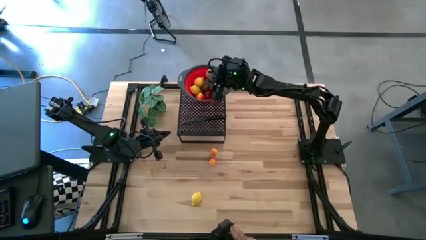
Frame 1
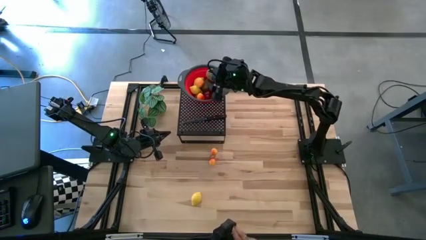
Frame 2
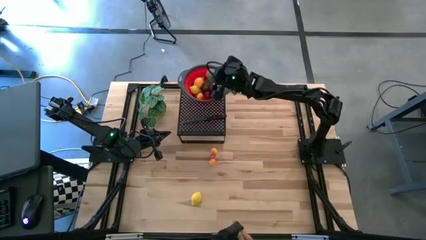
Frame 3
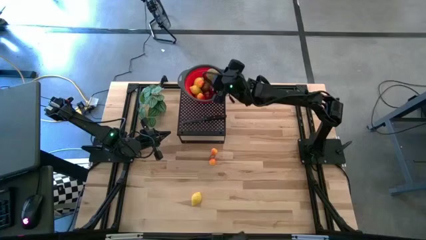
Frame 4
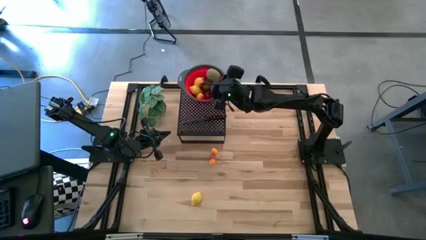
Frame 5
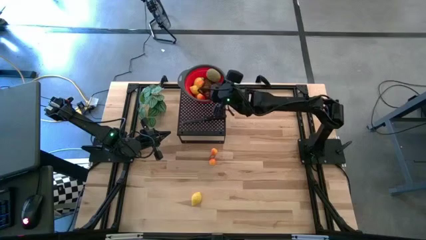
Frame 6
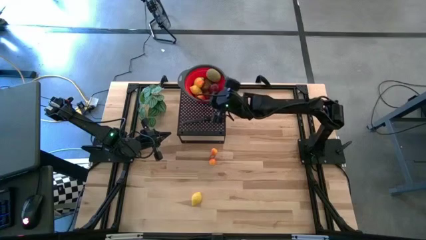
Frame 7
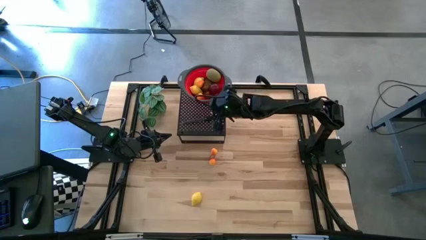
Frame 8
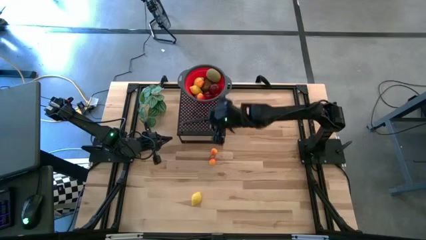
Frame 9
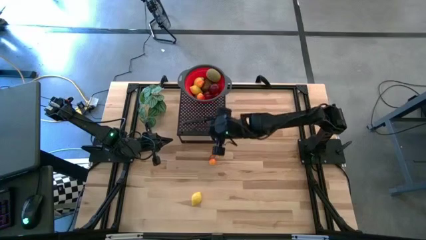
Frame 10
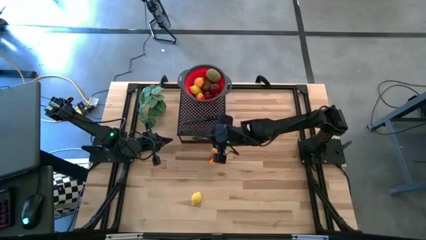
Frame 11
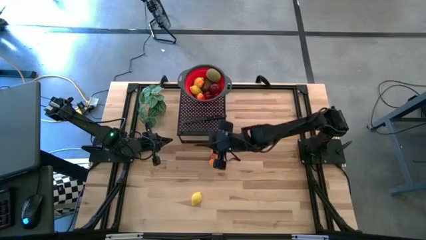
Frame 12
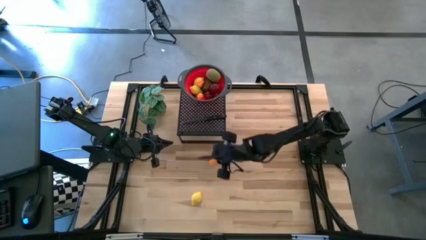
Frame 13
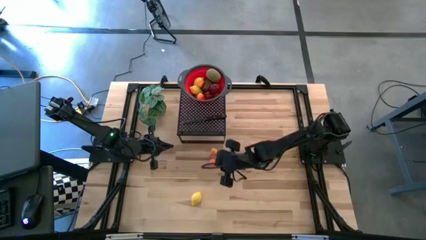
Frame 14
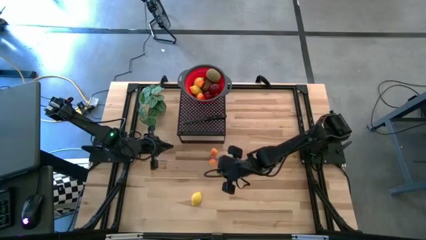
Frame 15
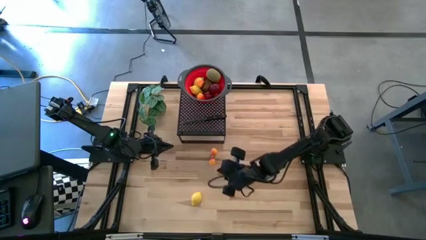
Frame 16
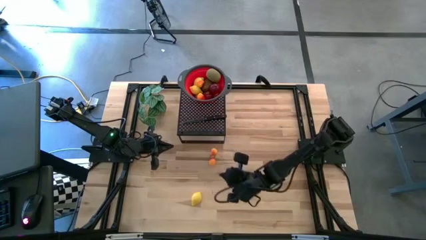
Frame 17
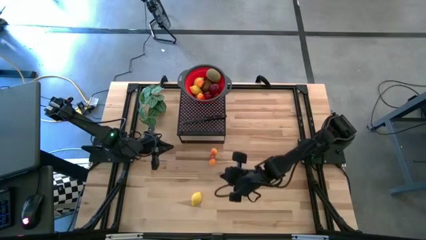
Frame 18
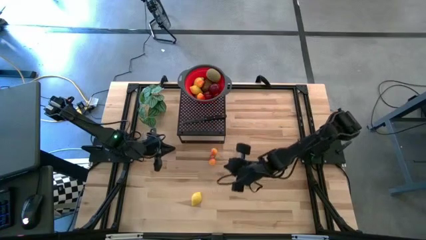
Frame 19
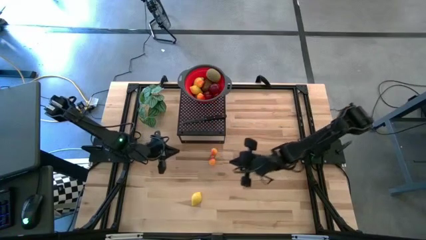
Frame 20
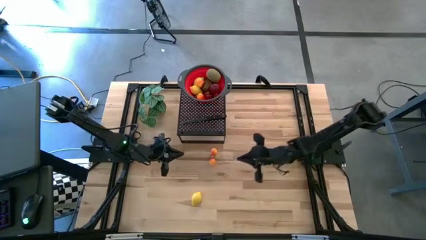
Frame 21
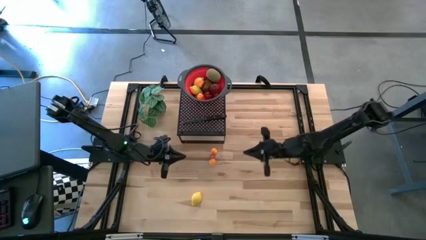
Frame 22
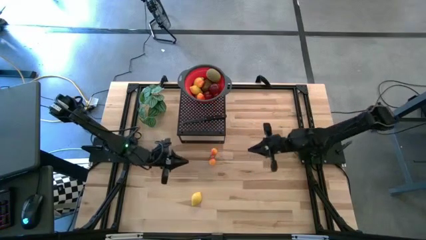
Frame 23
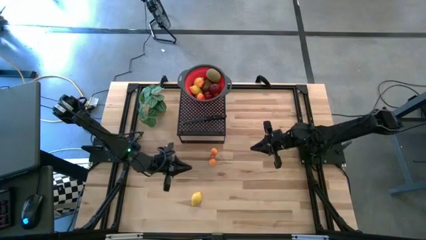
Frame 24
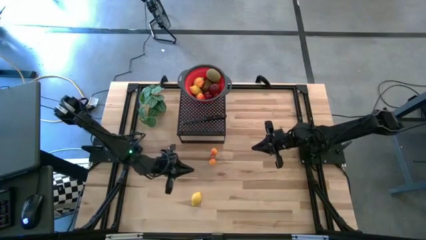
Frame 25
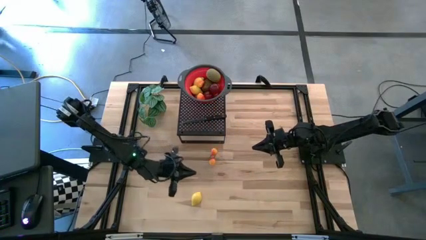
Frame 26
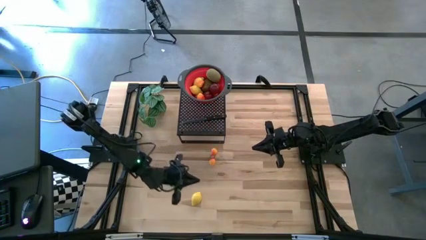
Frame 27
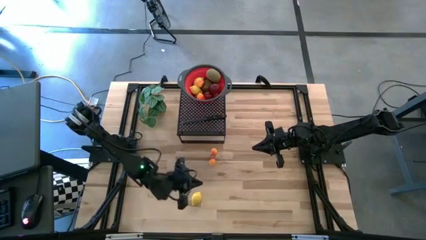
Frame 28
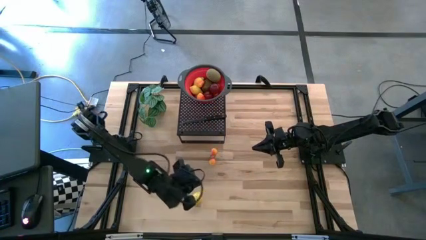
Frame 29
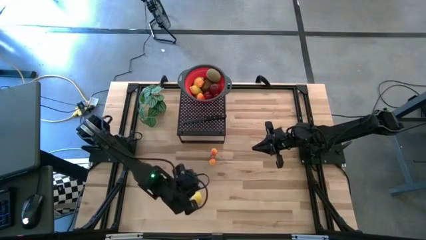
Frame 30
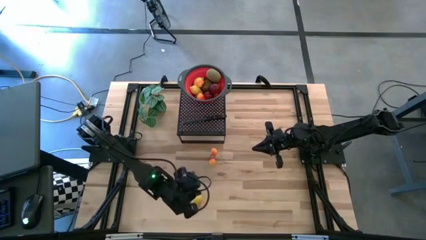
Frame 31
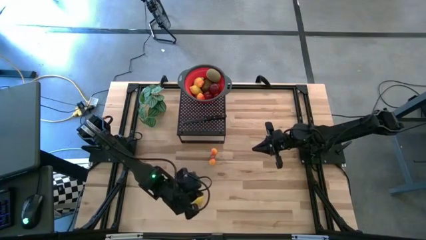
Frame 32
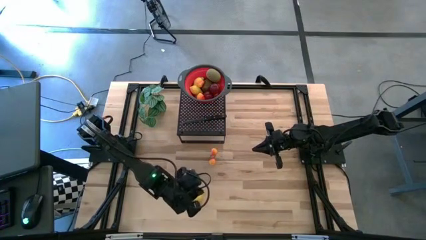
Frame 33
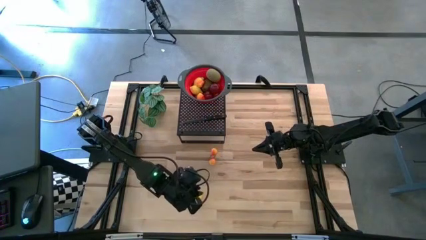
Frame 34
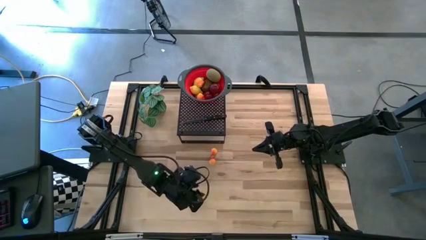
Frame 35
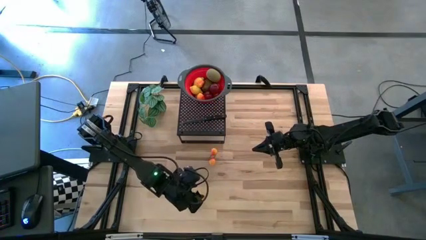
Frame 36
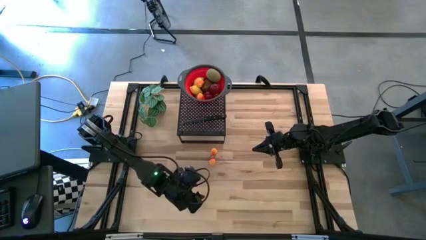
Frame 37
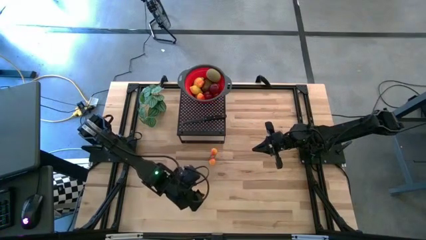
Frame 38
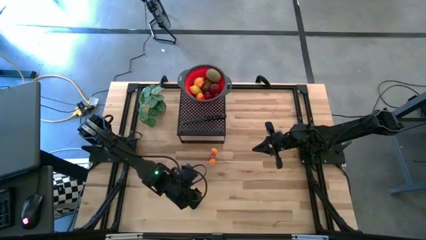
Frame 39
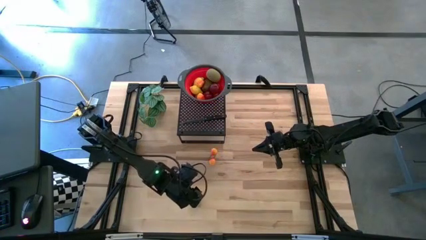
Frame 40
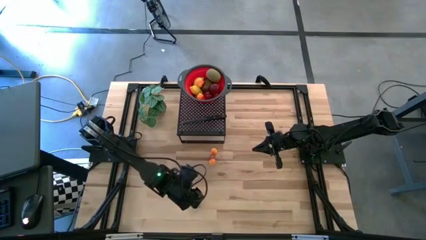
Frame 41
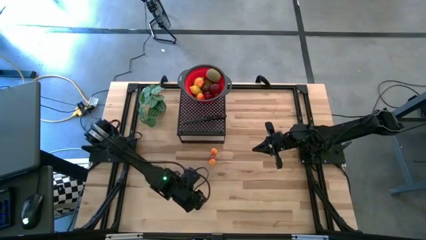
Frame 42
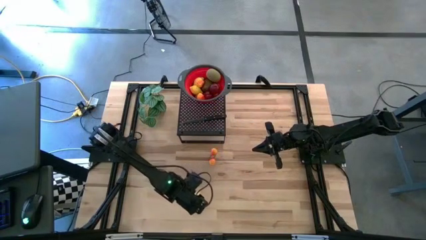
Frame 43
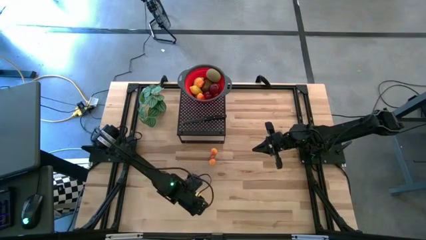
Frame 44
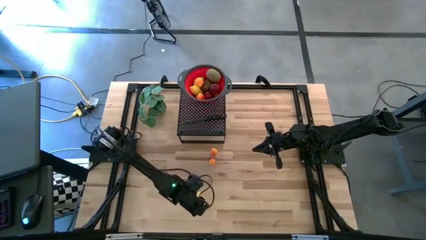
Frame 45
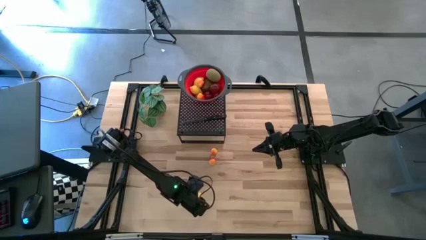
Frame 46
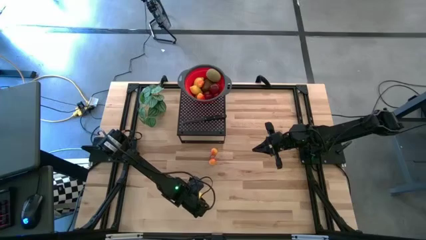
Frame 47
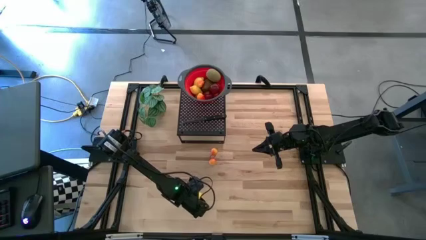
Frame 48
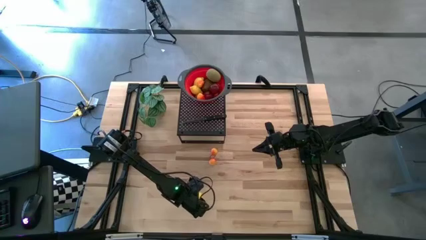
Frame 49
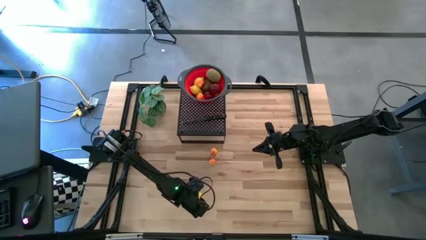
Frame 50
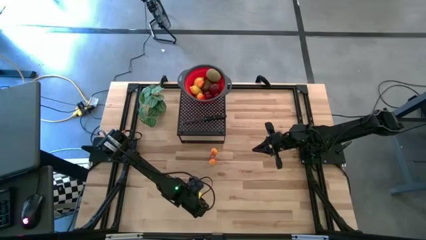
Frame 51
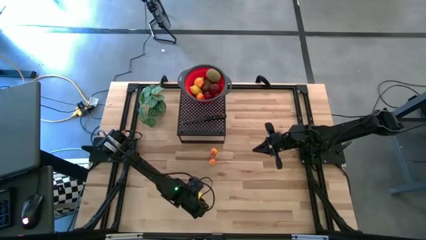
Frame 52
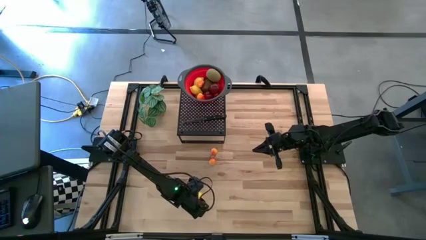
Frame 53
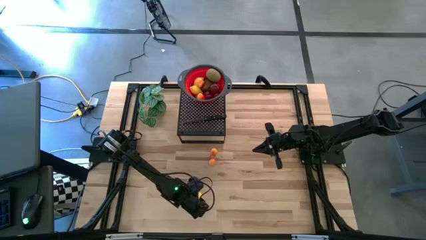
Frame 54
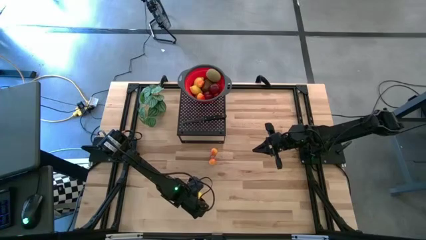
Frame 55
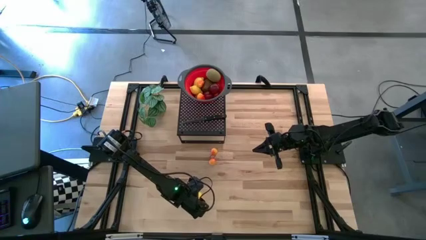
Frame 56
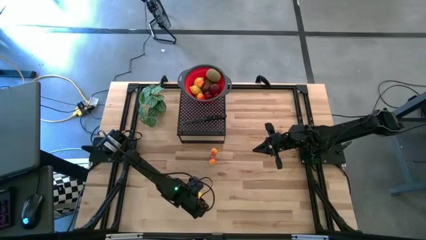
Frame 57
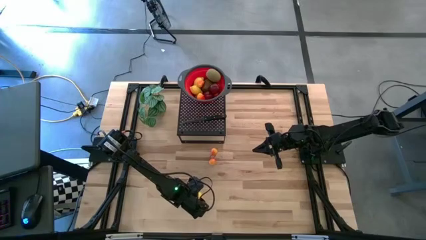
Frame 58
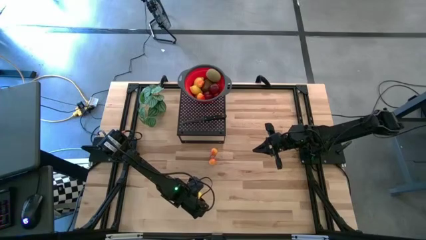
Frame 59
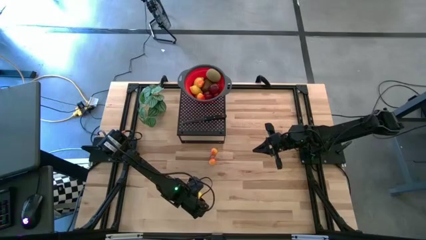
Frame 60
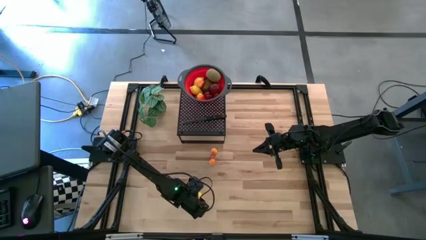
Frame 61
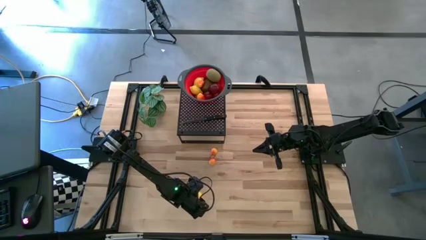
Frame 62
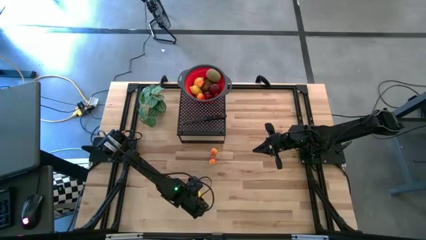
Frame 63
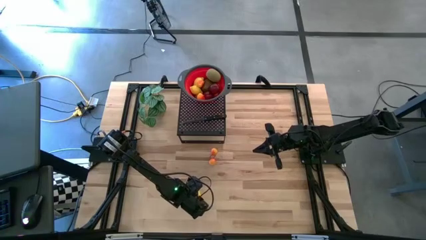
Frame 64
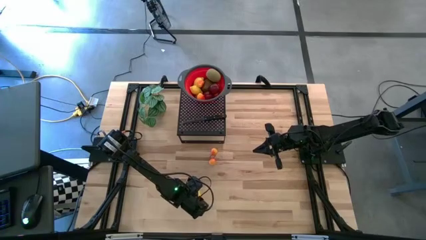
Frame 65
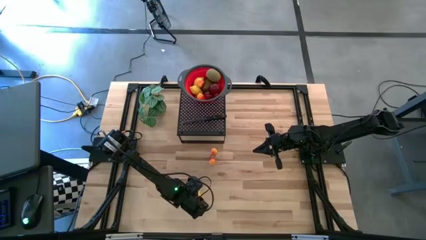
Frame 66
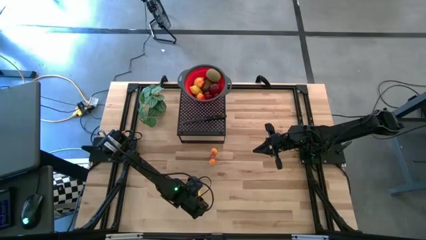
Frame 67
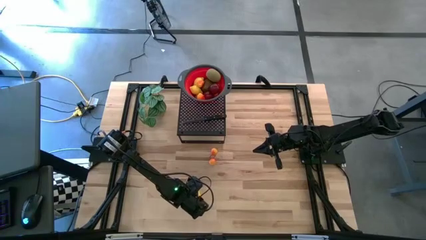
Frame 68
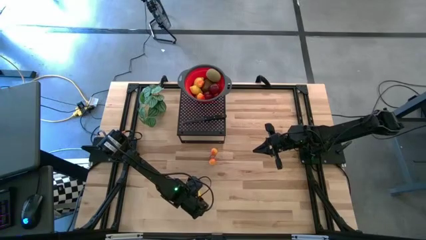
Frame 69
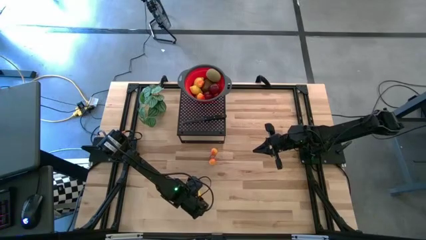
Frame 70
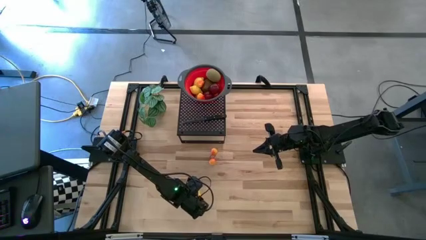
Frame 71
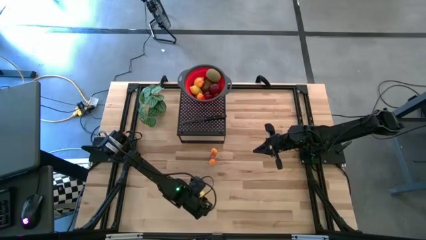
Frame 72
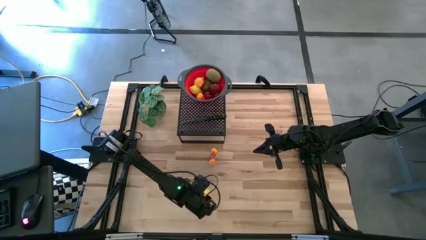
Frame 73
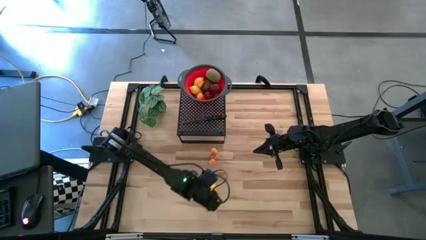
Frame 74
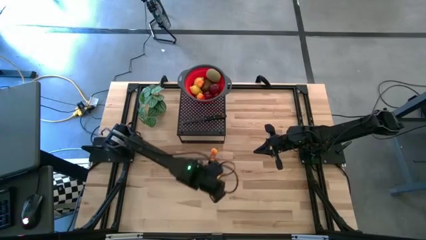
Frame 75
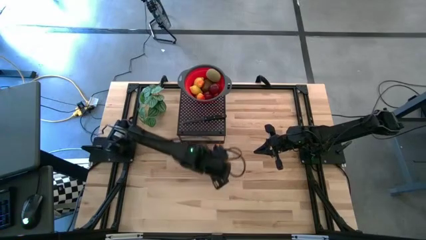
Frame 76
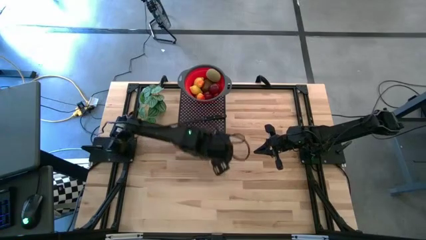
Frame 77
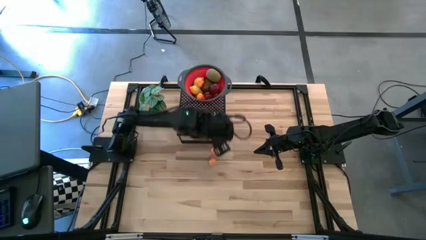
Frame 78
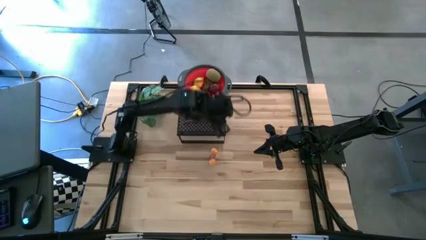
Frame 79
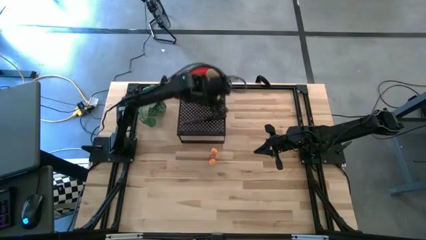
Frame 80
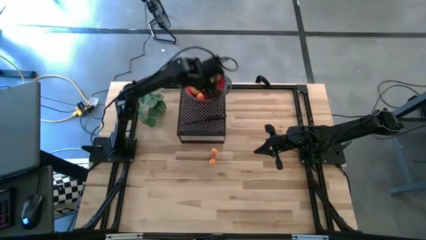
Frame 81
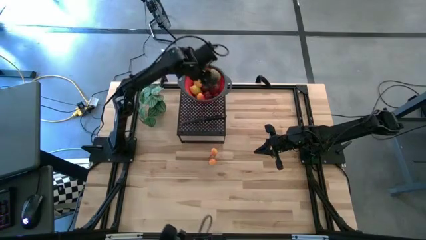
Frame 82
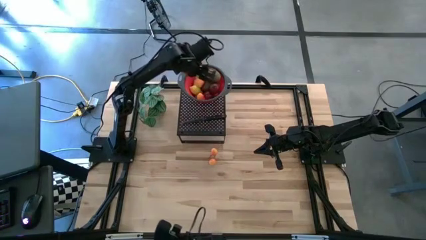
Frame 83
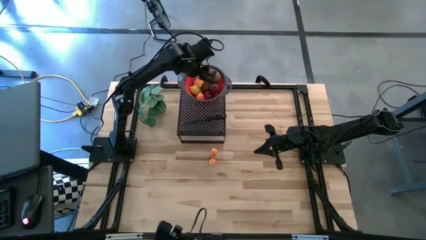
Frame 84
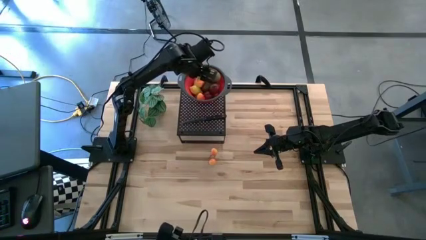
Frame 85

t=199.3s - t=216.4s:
Task: Pick & Place Fruit
Put the lemon into the red strainer bowl
